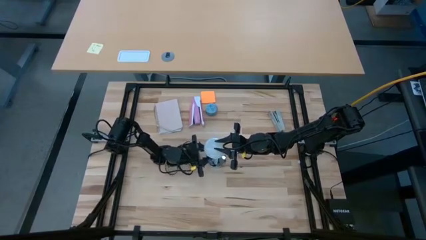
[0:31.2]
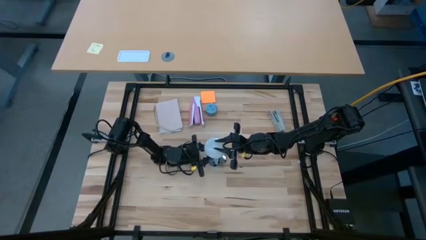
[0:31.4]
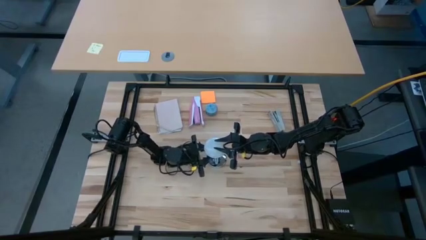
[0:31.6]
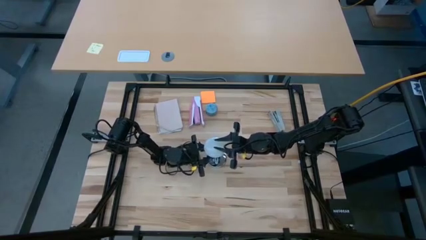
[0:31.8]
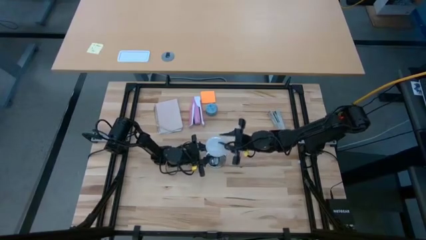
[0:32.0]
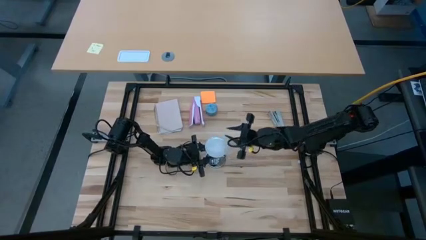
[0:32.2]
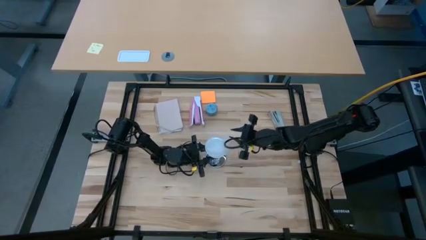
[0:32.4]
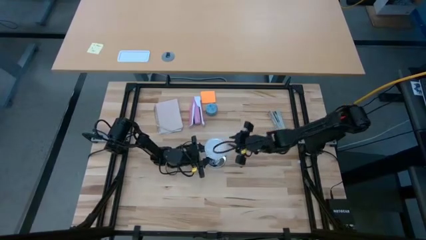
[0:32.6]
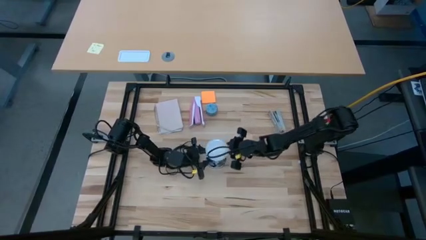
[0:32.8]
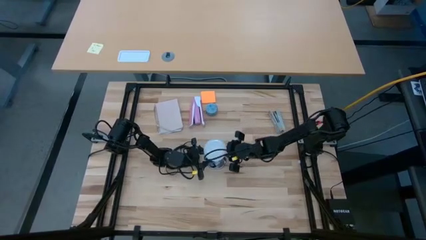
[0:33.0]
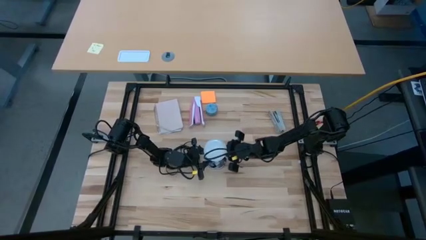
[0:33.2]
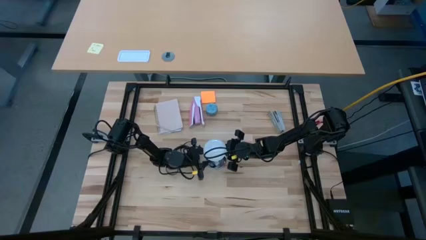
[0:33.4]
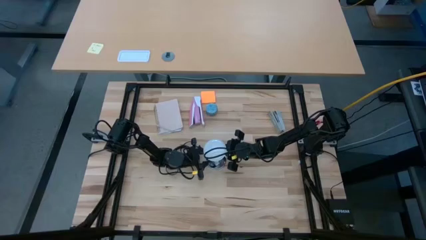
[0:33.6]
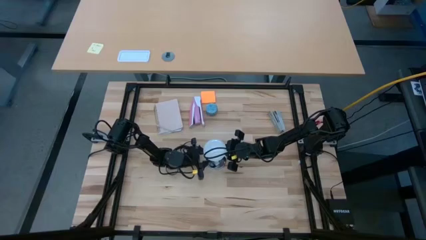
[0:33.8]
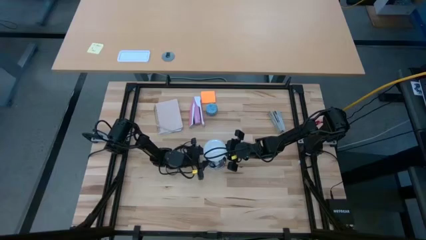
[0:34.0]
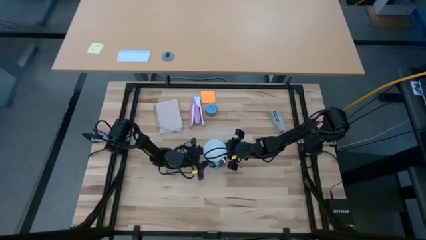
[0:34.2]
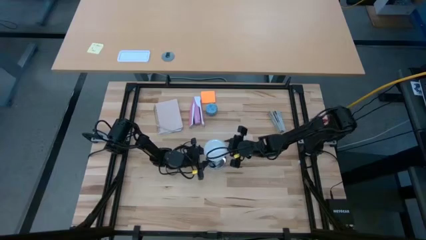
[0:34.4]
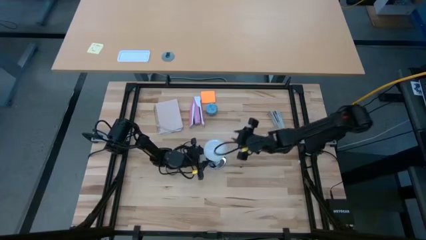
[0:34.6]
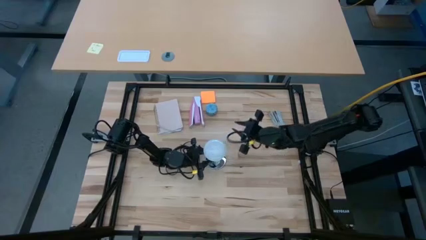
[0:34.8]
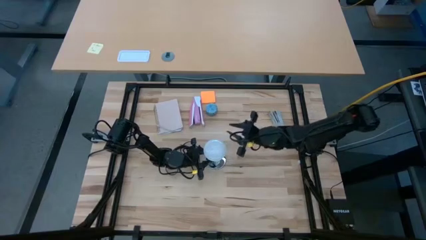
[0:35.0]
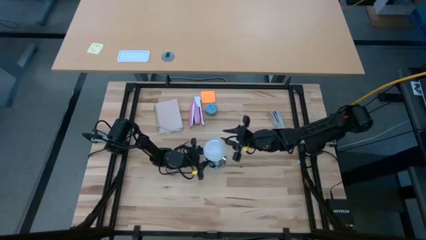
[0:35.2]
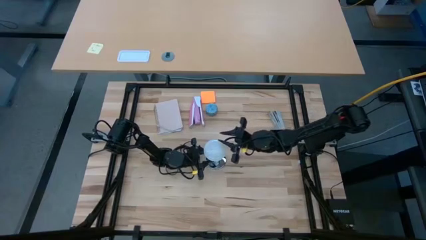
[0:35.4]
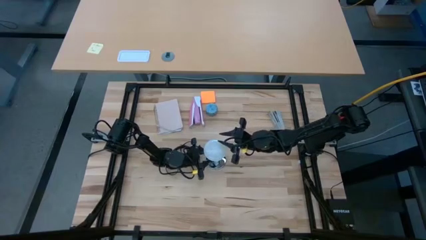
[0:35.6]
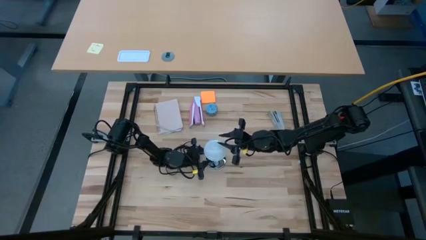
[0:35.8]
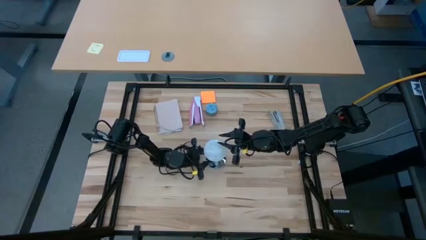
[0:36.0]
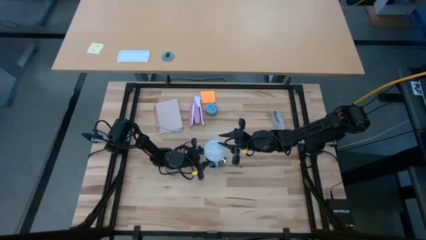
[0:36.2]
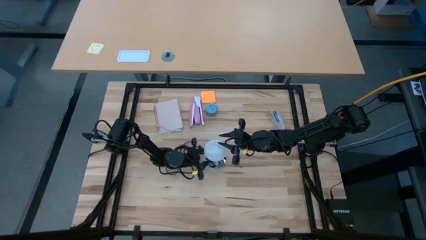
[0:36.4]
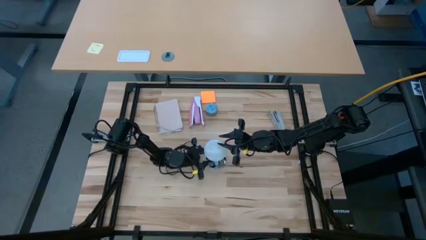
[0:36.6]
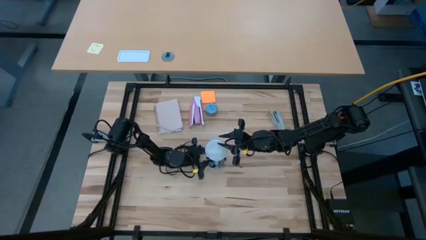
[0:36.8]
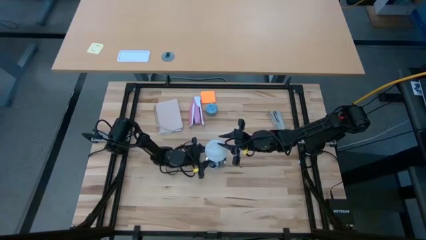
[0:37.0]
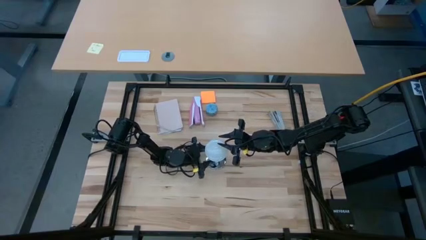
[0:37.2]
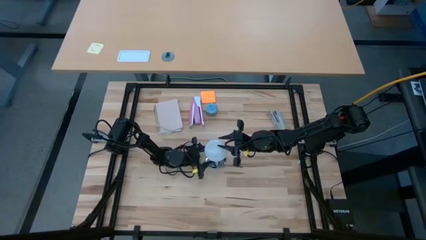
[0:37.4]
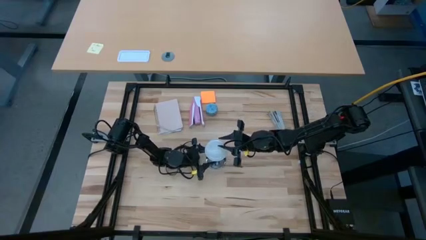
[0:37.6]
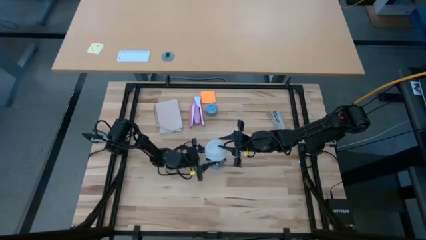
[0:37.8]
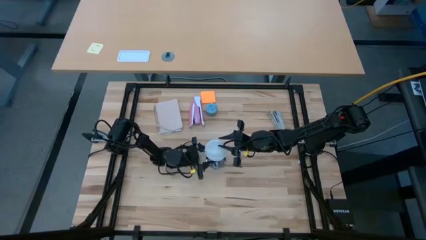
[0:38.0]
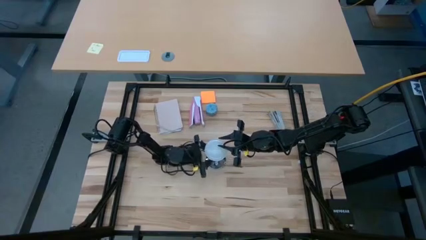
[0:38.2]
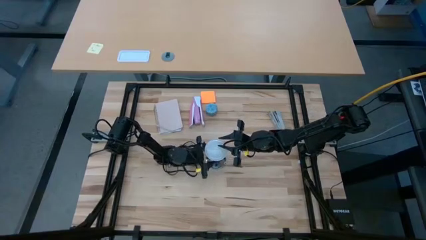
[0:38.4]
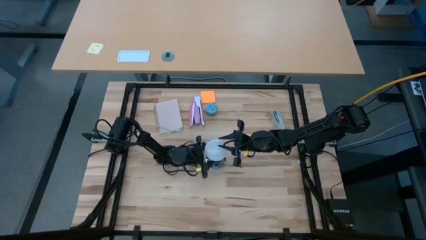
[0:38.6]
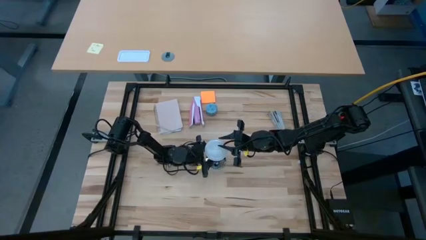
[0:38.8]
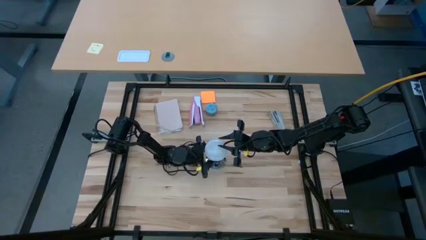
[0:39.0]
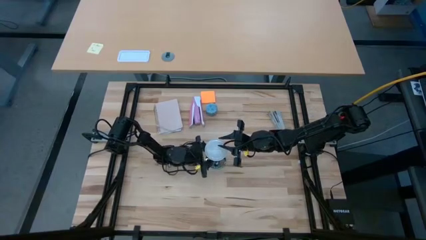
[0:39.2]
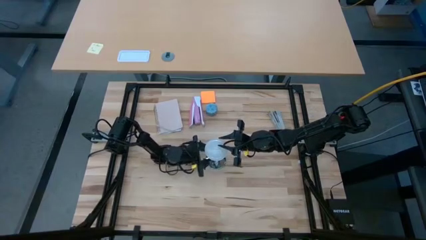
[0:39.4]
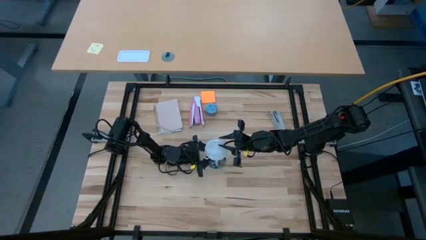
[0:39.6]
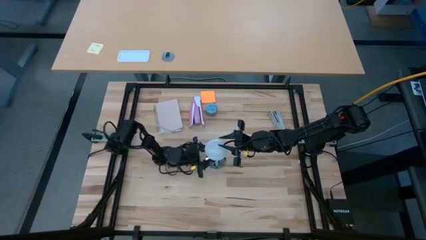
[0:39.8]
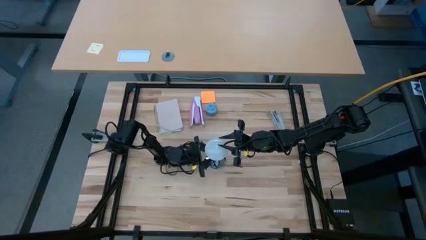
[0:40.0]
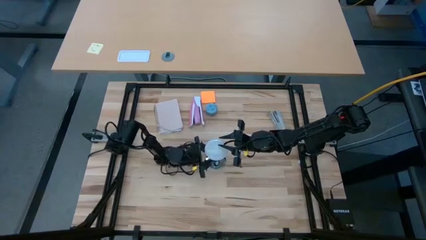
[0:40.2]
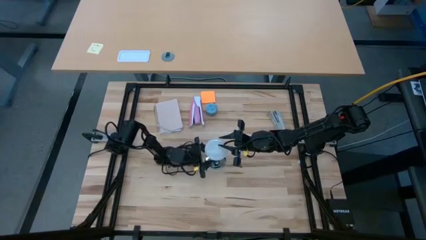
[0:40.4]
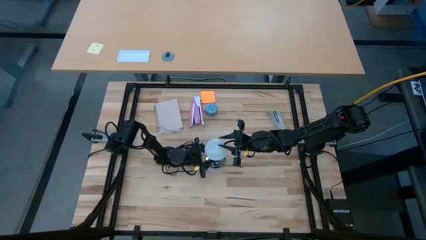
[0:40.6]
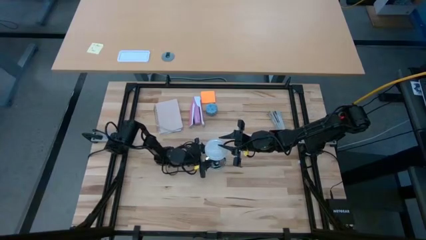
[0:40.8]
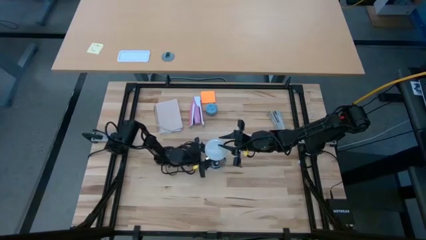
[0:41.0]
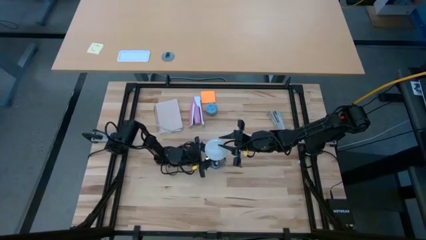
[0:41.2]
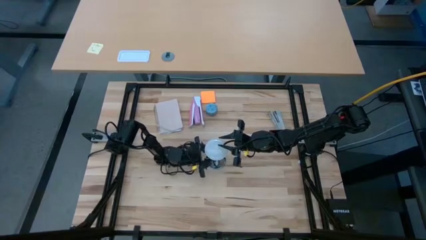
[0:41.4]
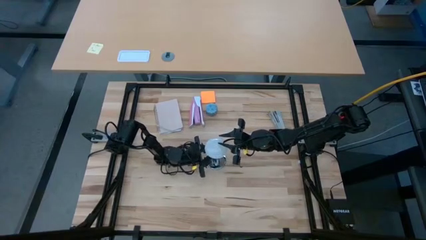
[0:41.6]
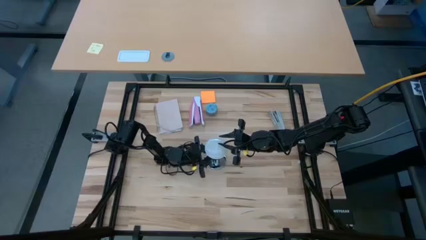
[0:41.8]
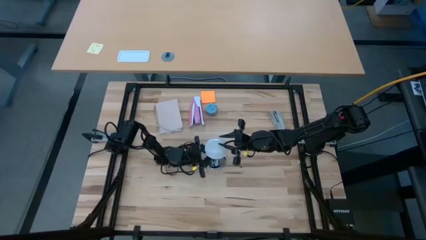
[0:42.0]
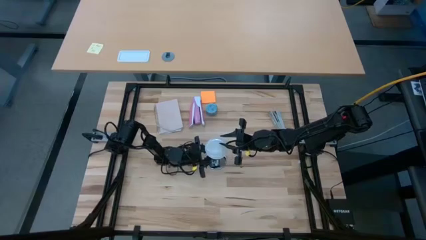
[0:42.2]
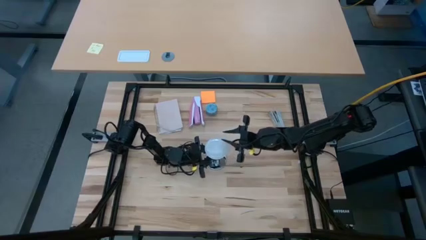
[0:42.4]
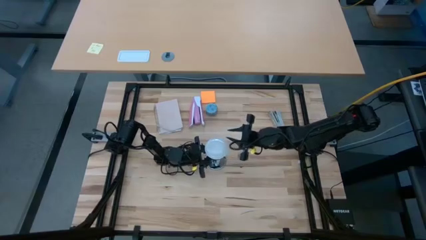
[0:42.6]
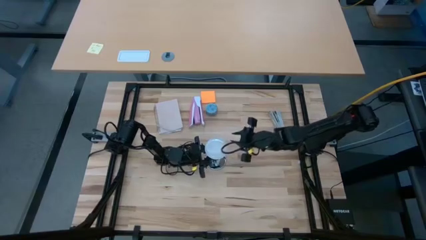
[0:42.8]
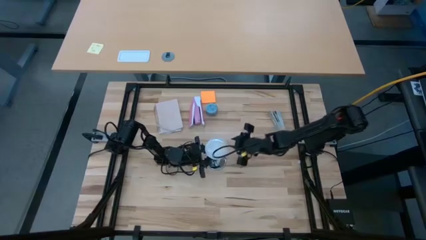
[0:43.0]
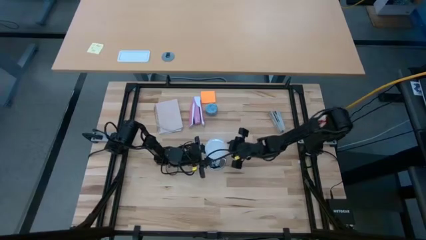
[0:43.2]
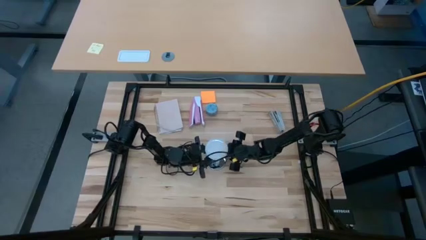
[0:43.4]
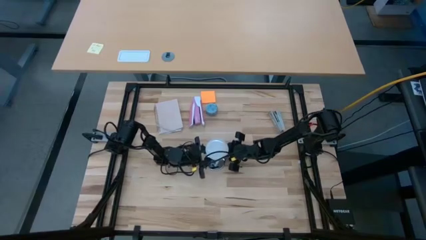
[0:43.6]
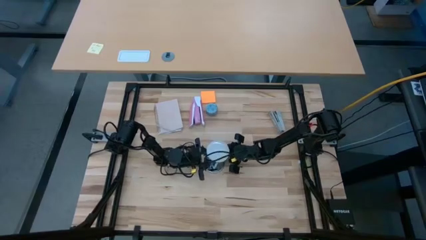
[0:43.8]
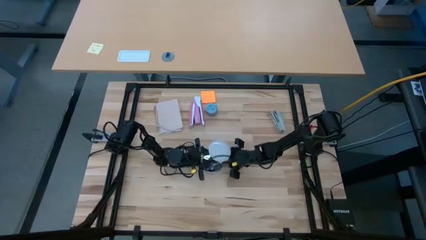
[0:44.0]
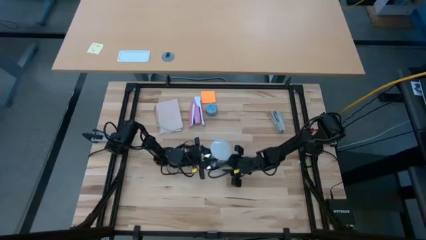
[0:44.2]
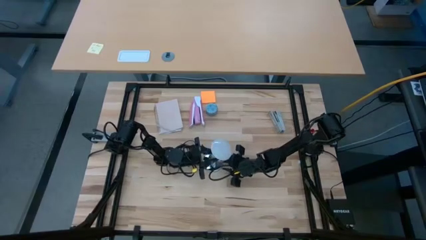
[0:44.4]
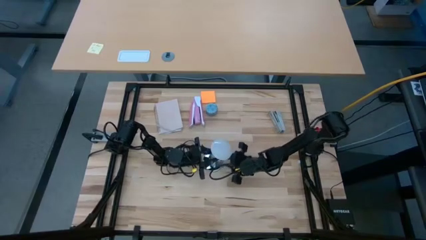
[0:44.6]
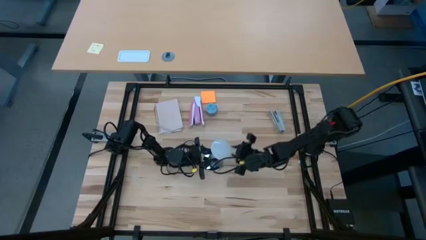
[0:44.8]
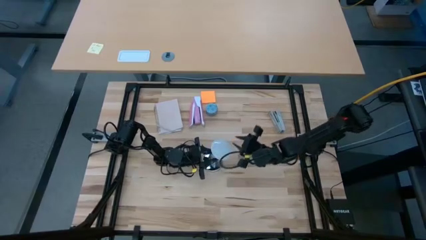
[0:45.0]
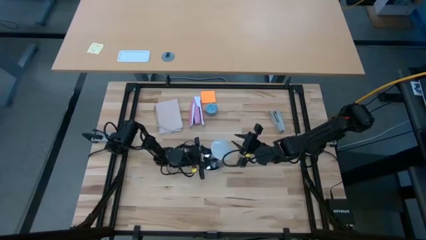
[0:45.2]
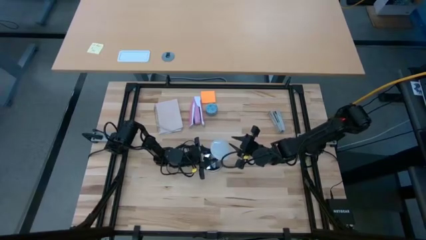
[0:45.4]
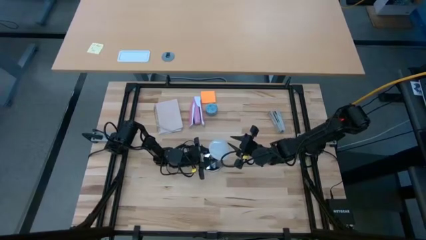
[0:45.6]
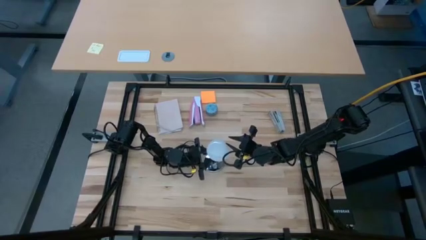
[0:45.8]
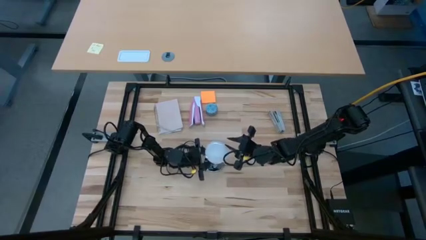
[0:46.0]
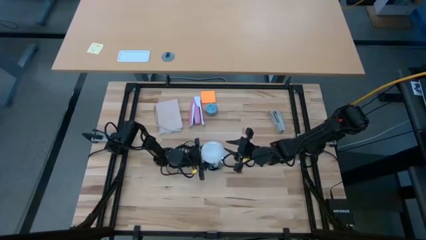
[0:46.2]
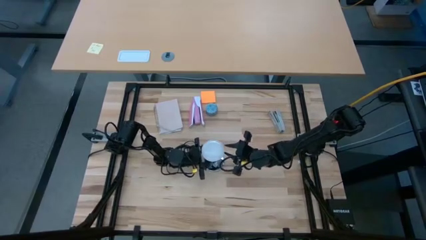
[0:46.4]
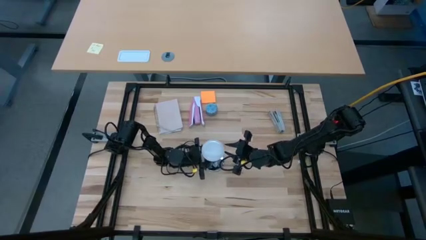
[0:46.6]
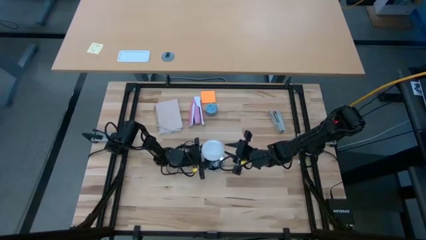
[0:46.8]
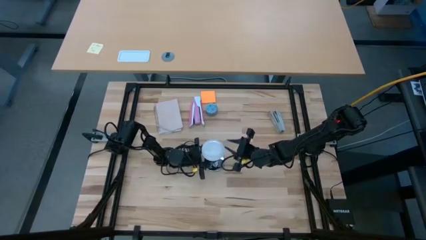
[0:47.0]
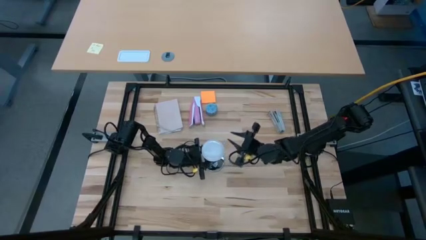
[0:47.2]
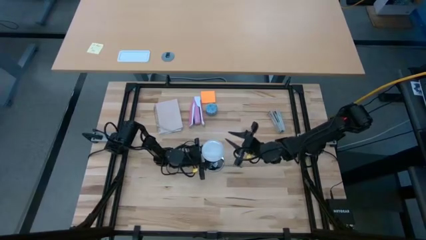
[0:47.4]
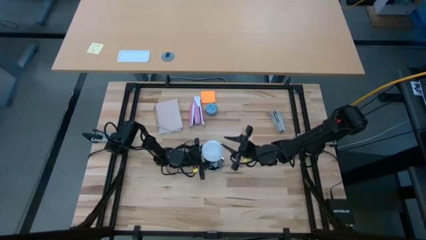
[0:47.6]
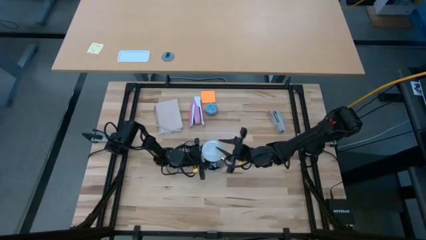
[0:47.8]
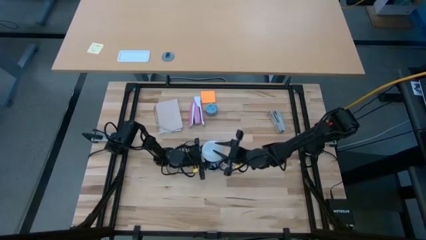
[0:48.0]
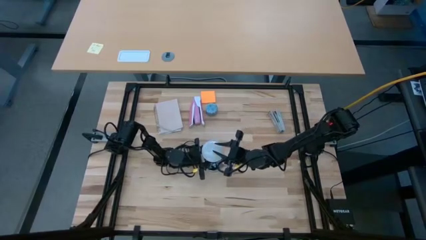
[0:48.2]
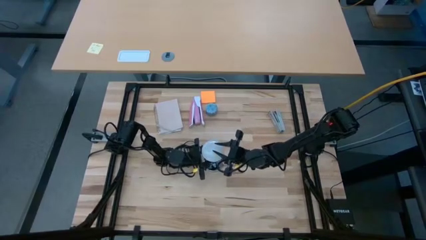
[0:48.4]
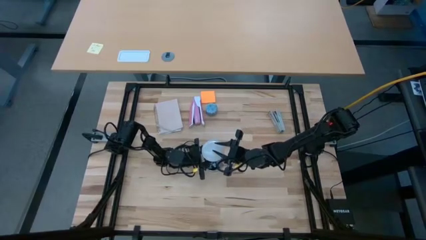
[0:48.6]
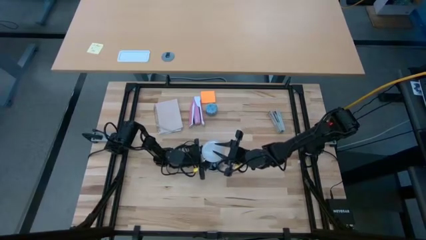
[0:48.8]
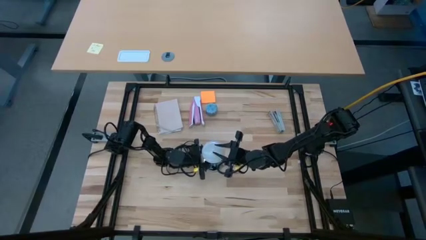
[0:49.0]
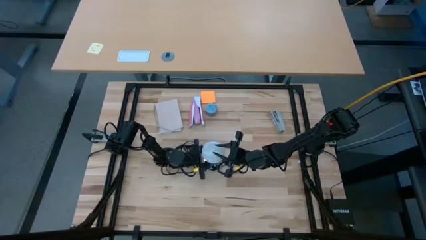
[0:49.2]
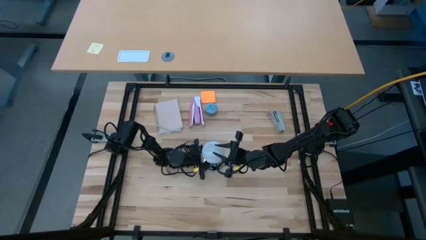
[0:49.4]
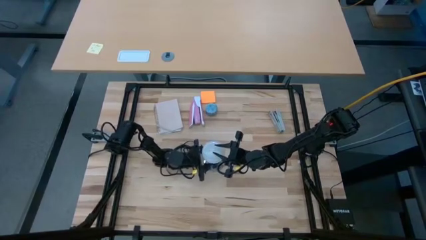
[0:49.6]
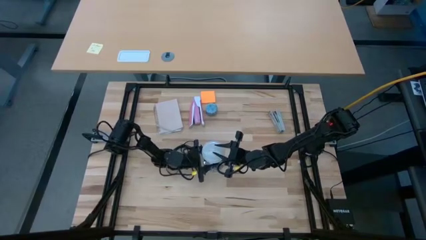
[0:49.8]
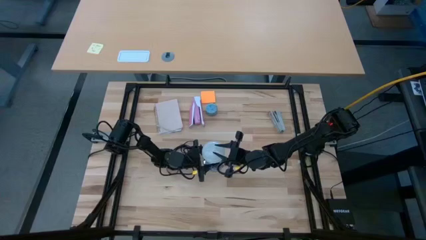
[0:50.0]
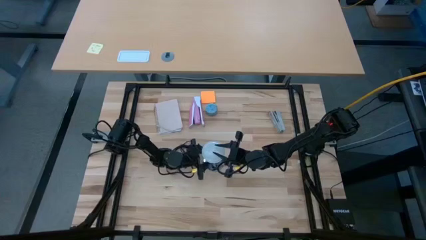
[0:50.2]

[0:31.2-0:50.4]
Task: Screw lightbulb
Insert the lightbulb into the lamp
